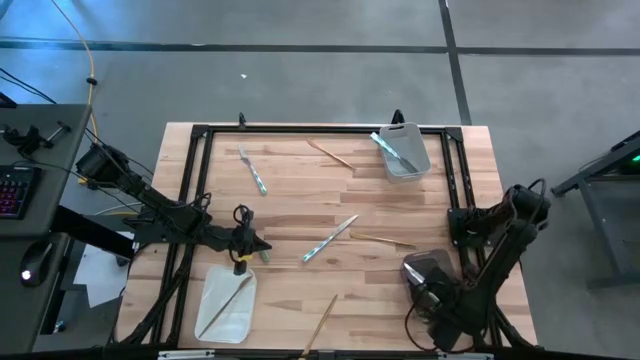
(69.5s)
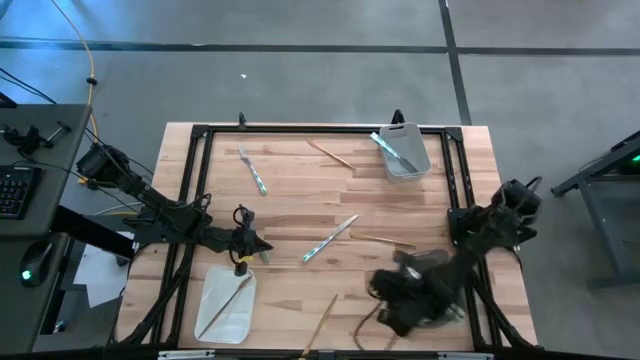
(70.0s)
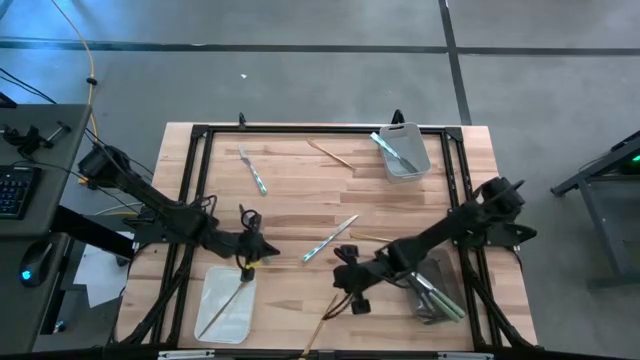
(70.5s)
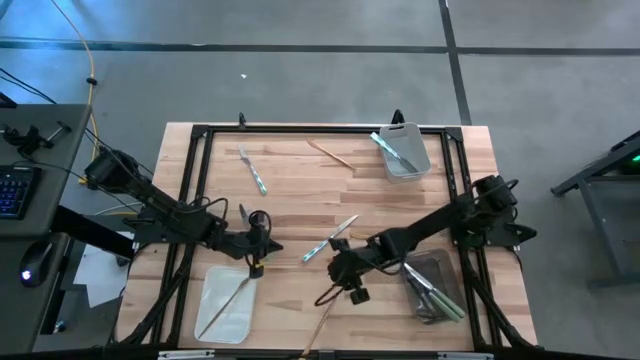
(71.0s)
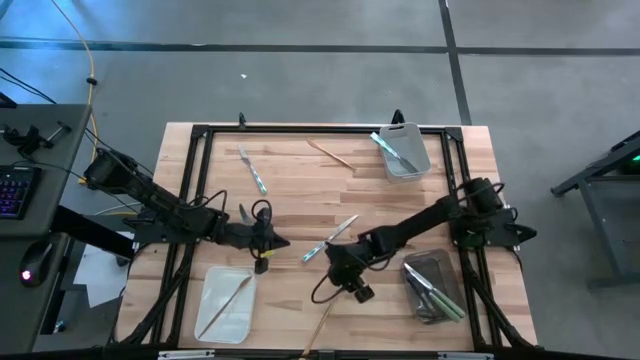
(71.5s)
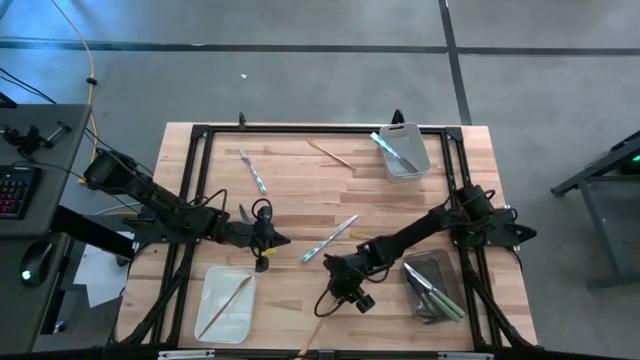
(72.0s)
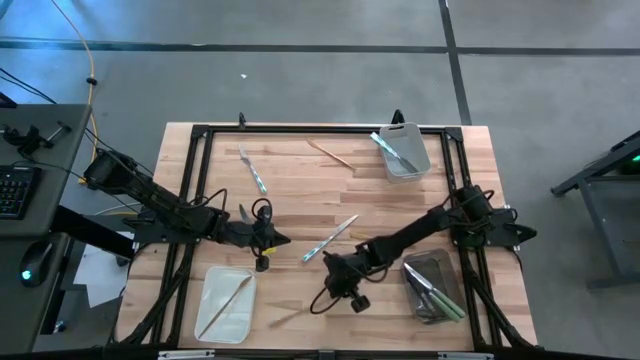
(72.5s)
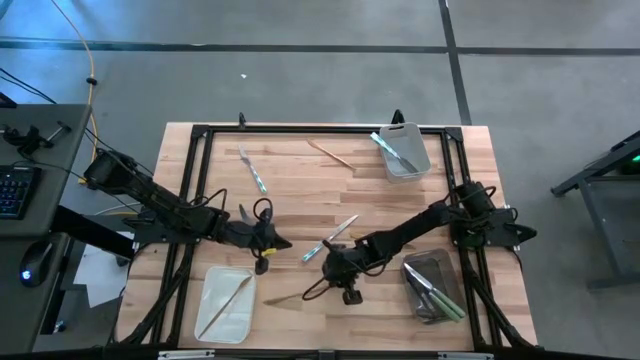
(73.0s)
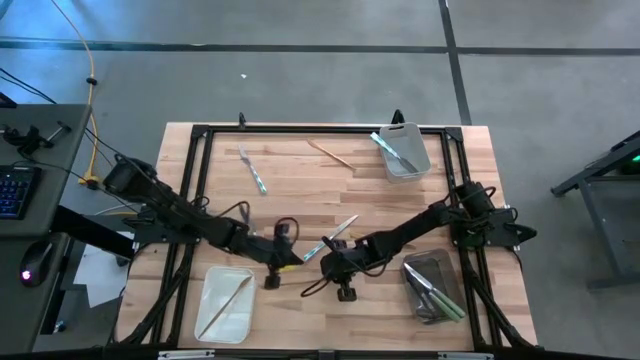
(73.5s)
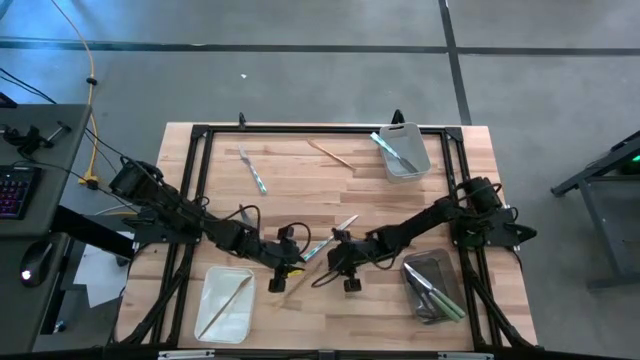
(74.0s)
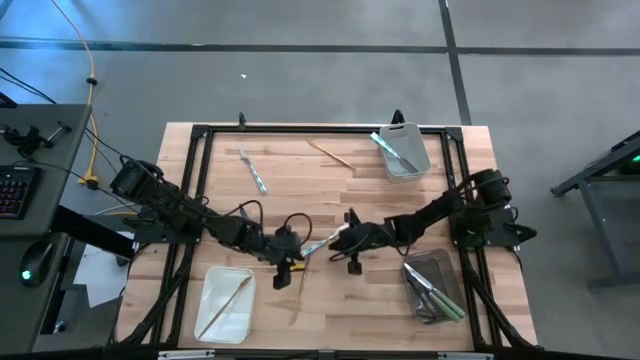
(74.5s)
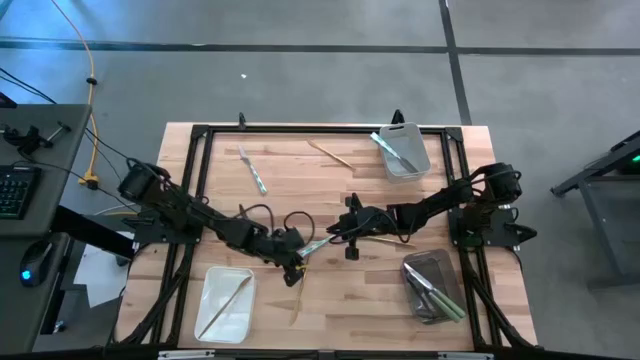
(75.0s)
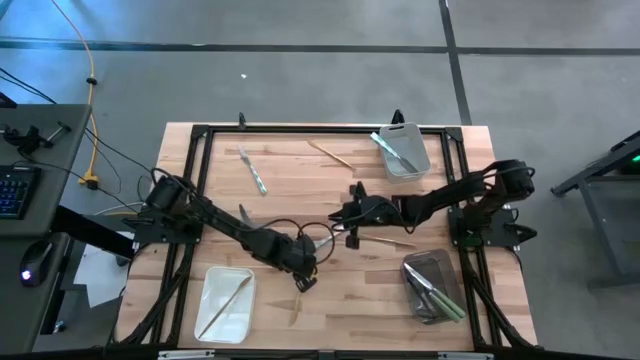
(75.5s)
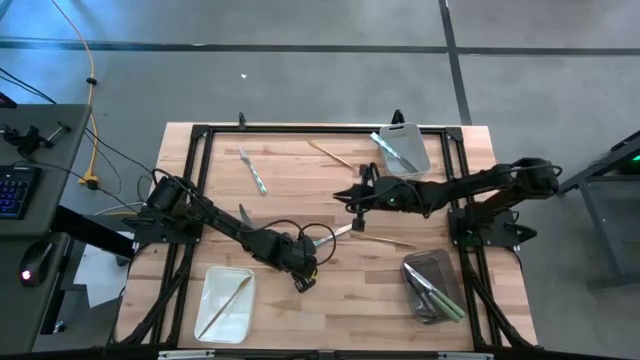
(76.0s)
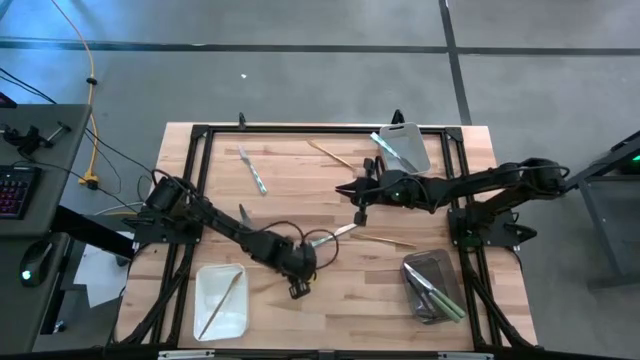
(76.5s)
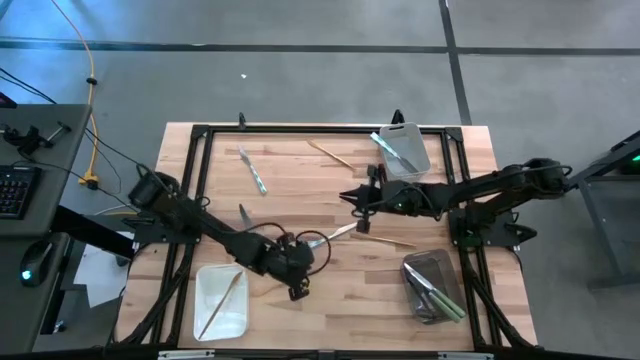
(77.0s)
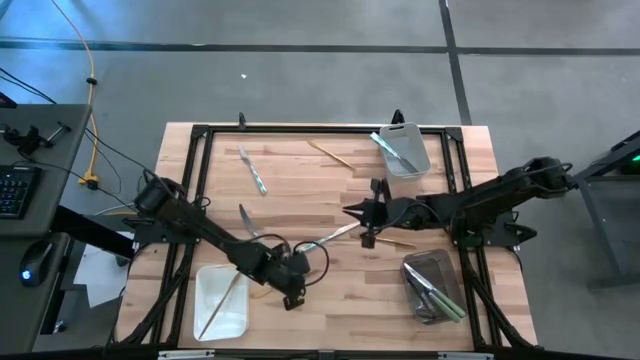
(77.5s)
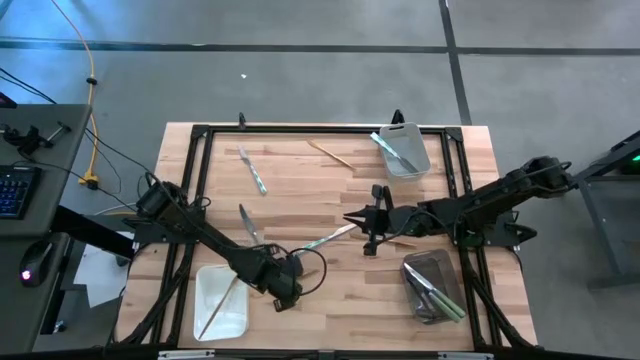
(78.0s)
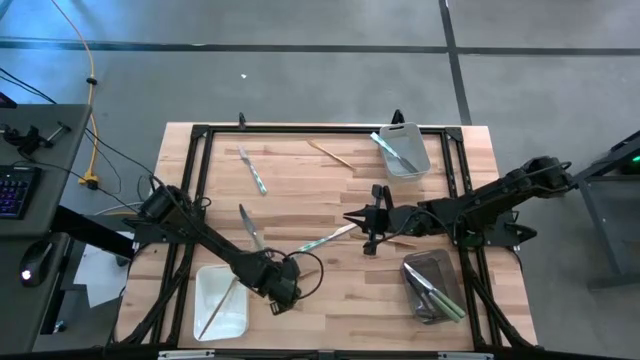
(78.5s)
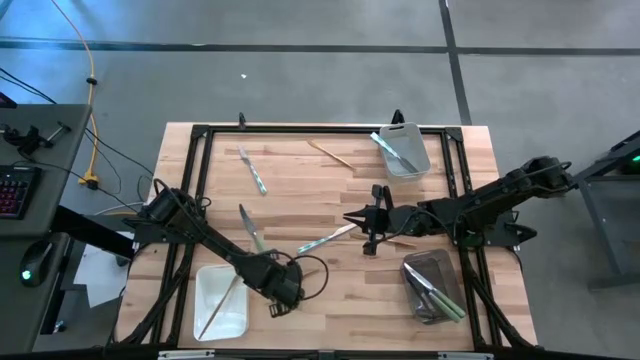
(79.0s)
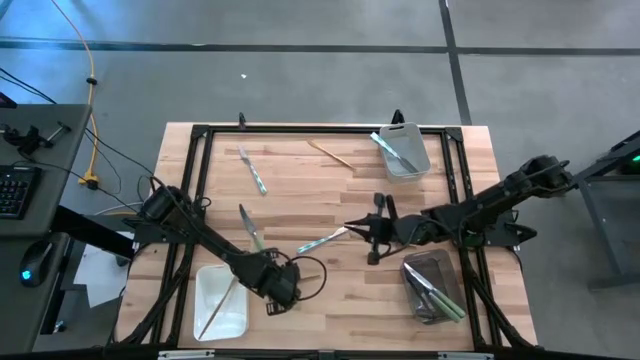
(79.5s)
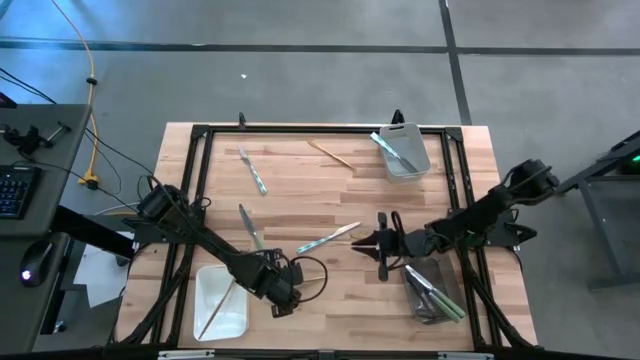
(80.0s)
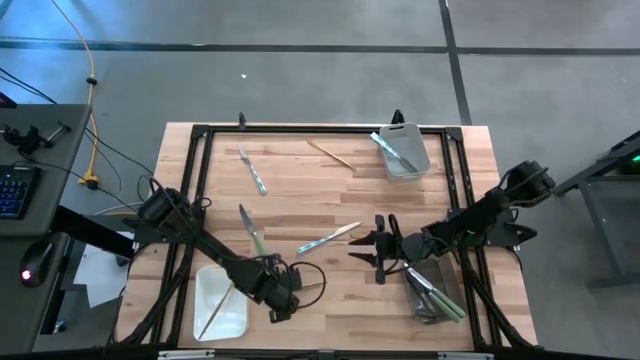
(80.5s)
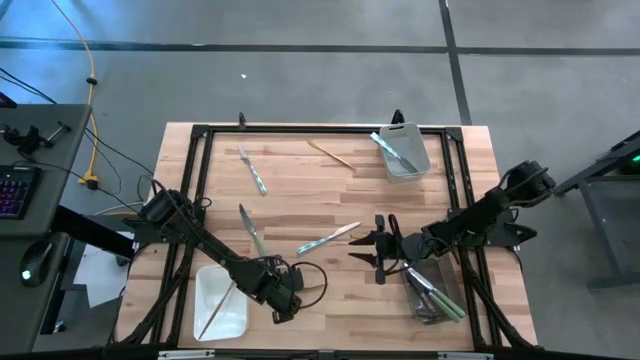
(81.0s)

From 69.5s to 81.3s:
Task: Sort silverware by color (type)
Put the gold table knife into the white bin

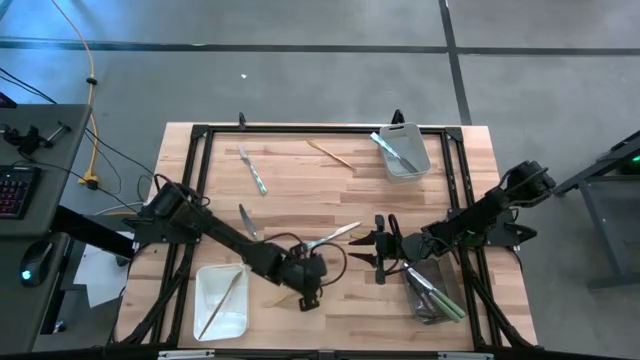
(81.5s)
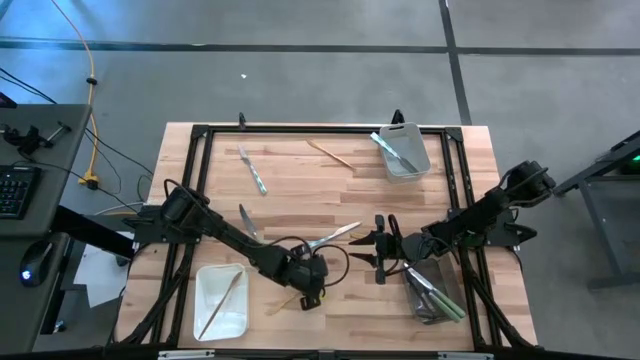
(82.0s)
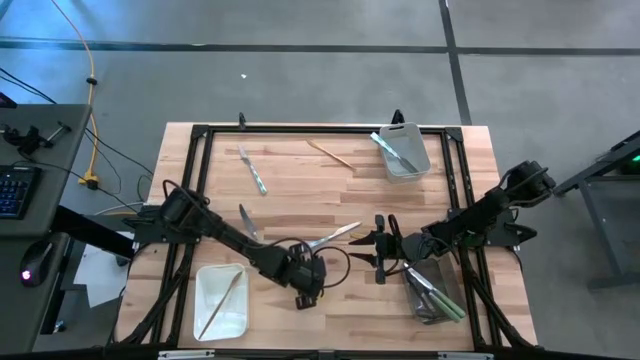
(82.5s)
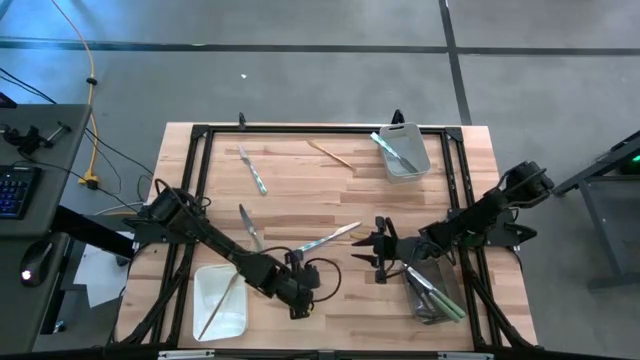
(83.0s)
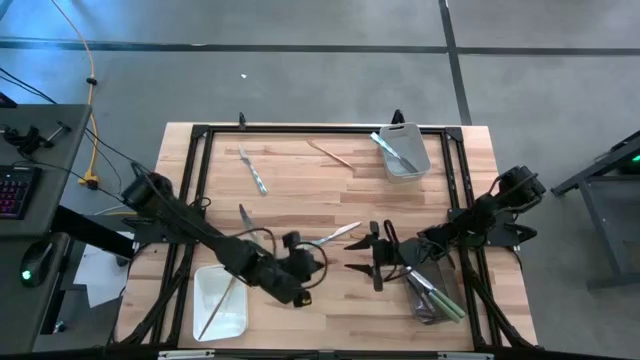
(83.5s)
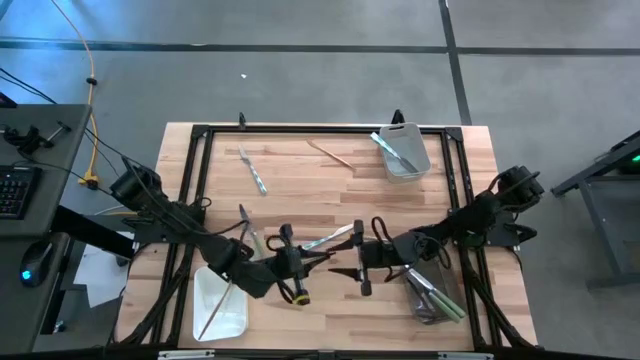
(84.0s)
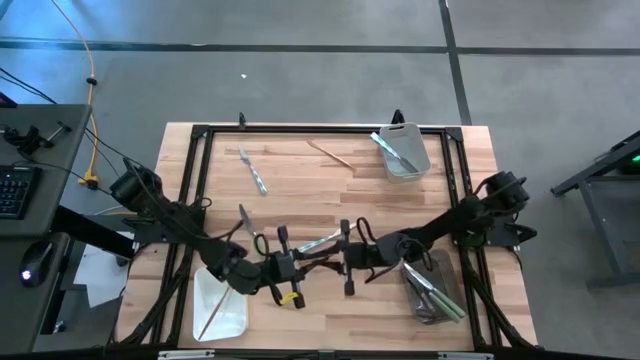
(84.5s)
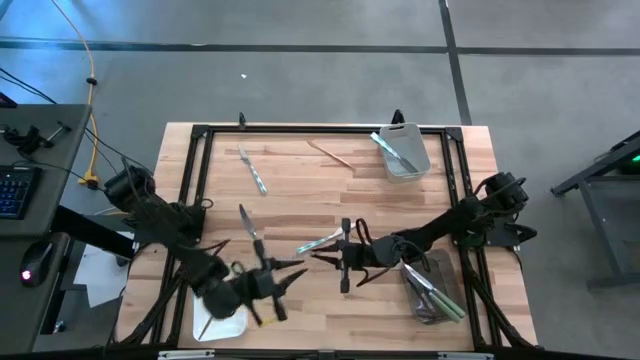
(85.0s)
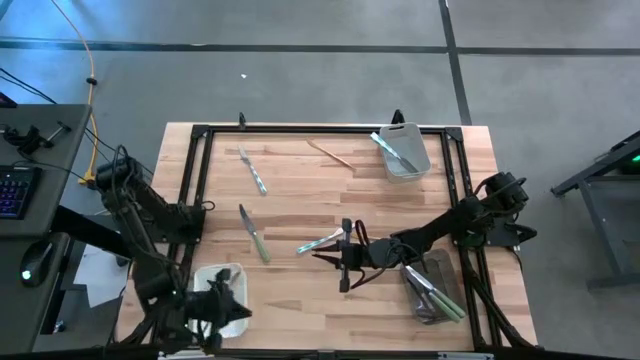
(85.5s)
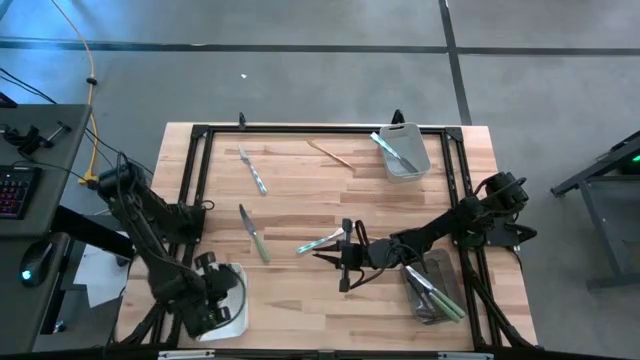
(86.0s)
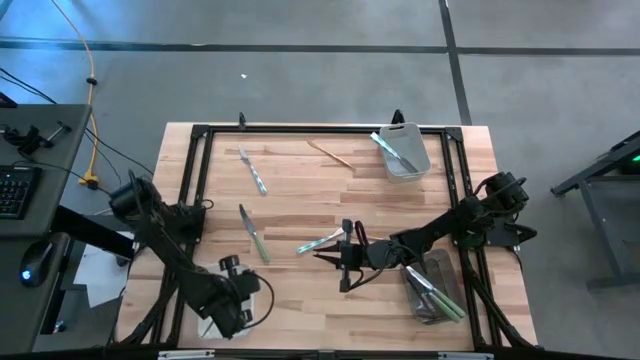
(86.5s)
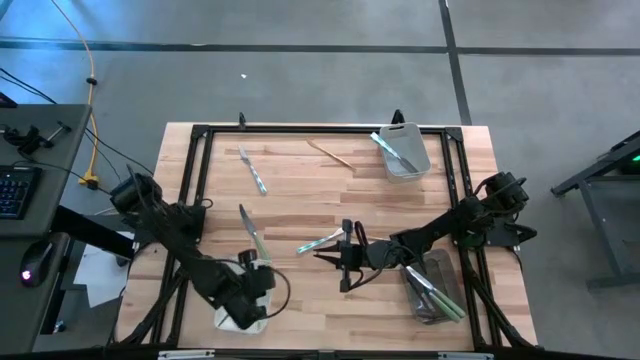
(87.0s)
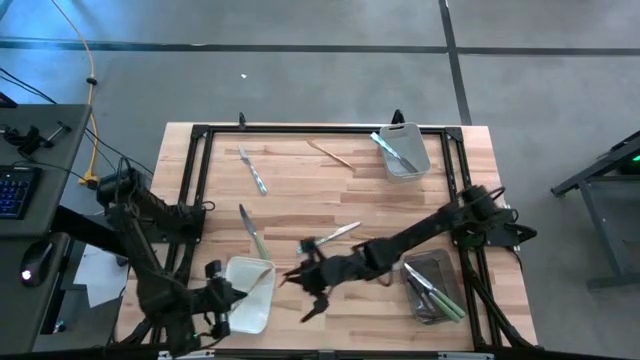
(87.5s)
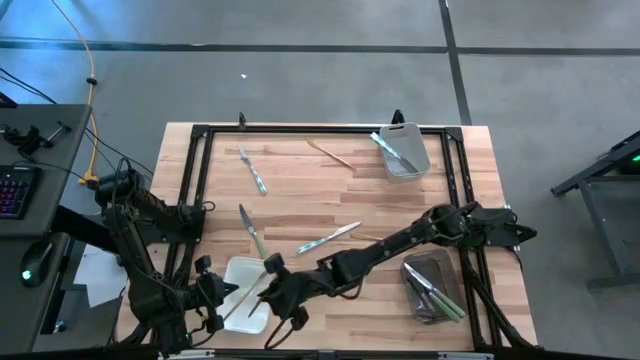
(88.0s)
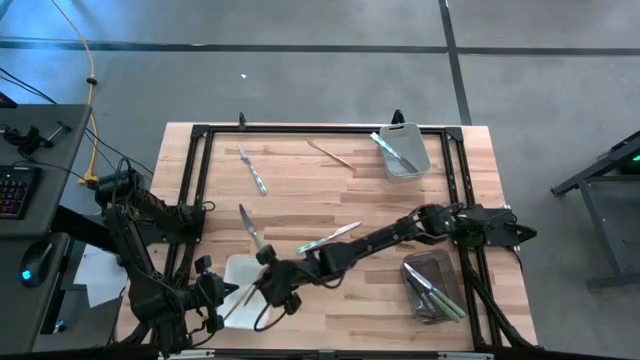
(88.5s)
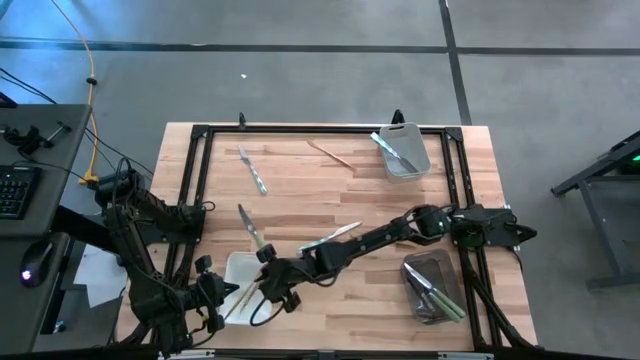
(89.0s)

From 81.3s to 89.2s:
Put the gold table knife into the white bin

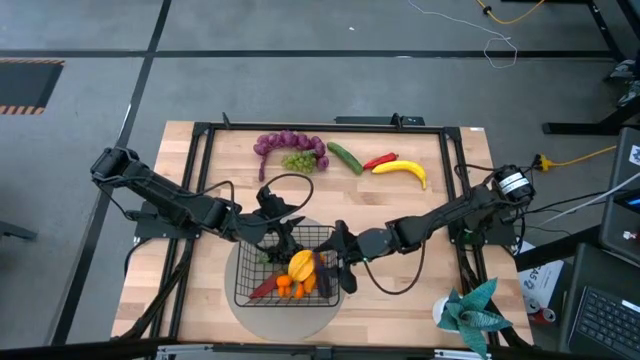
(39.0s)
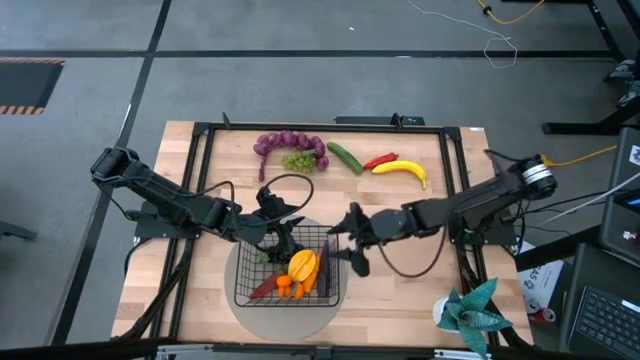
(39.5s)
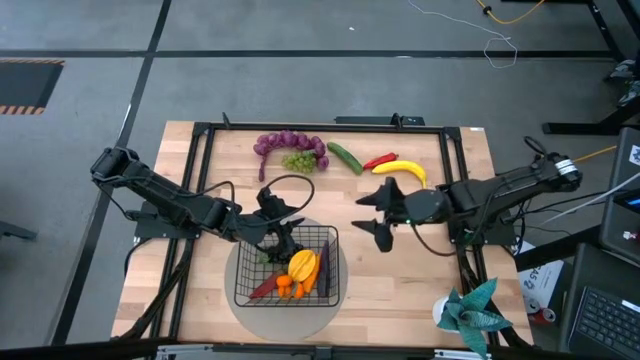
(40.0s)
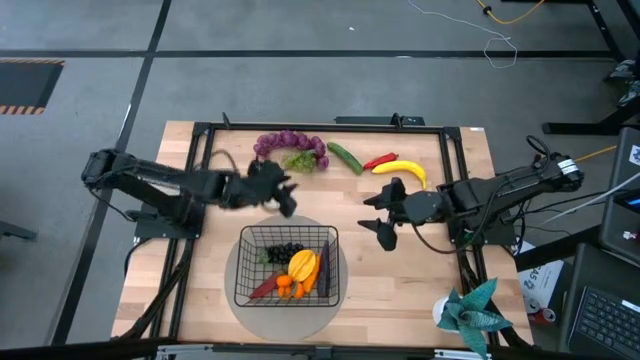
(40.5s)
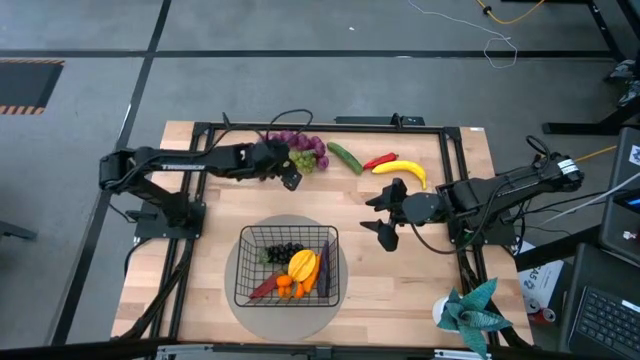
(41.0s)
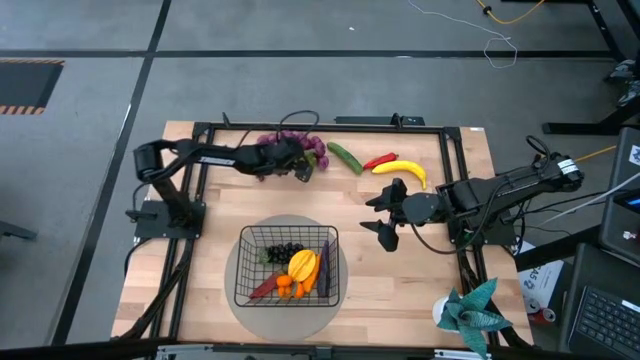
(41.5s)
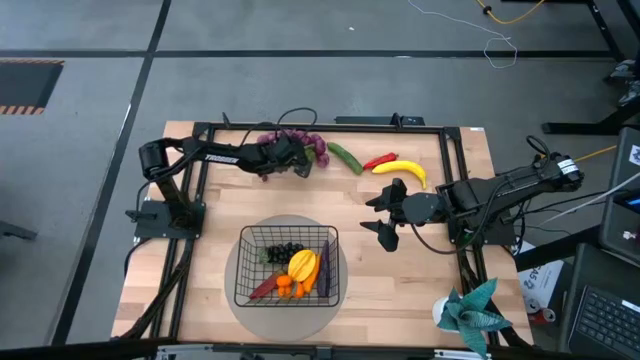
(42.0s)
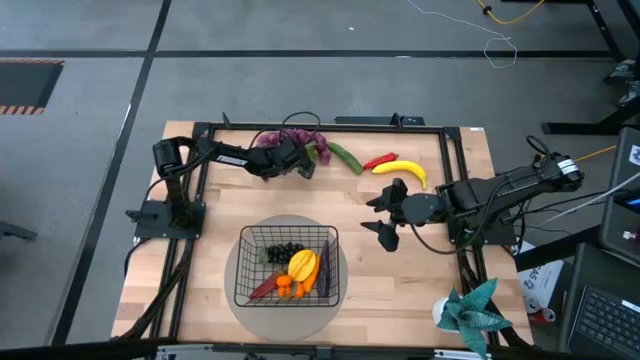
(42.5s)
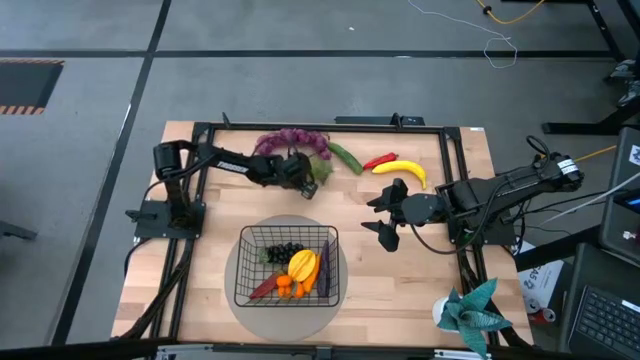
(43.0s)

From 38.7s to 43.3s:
Task: Build produce basket
Put the green grapes into the black wire basket
